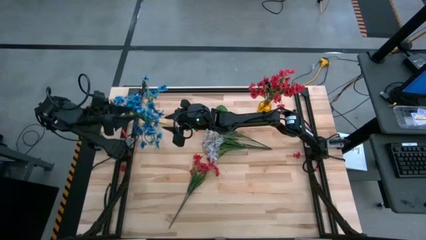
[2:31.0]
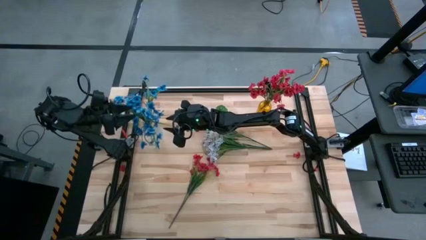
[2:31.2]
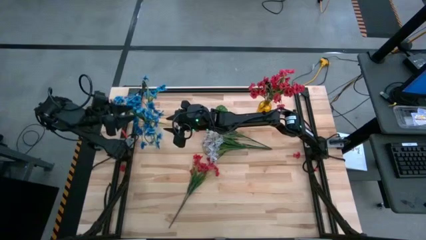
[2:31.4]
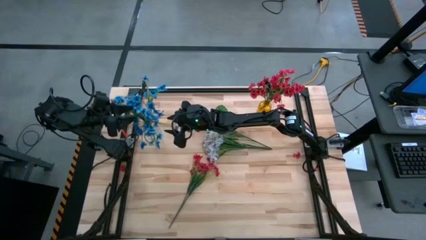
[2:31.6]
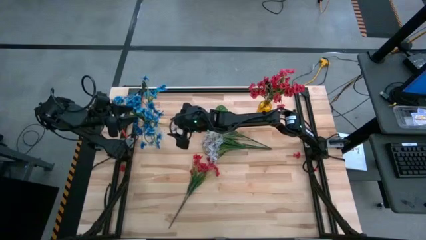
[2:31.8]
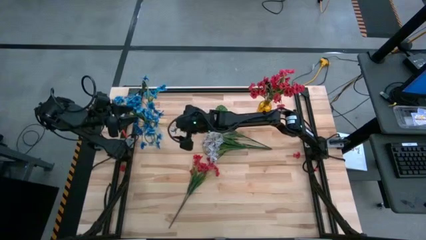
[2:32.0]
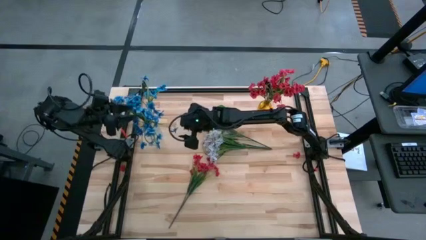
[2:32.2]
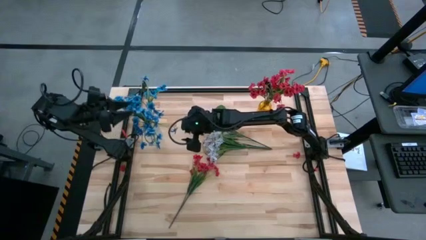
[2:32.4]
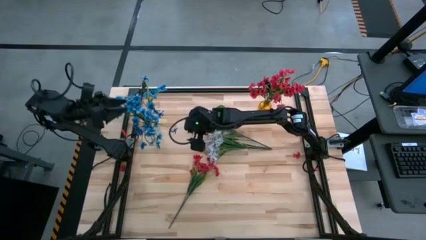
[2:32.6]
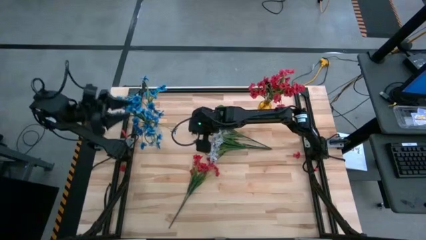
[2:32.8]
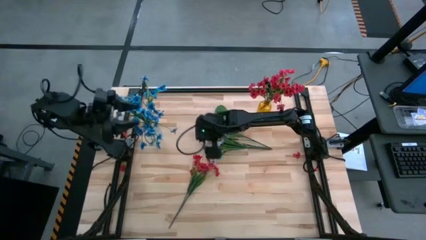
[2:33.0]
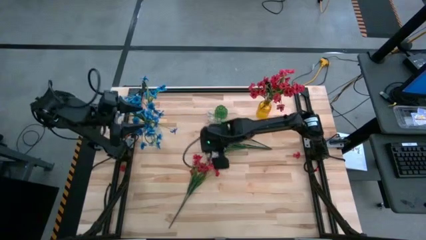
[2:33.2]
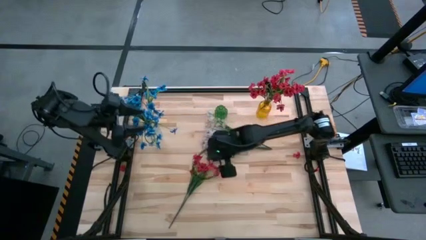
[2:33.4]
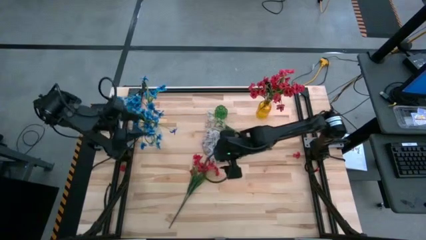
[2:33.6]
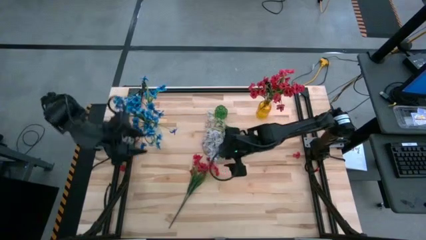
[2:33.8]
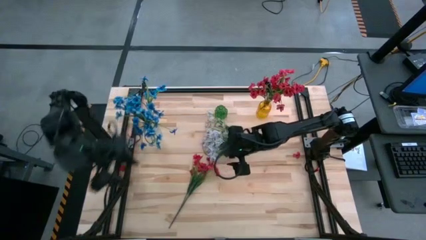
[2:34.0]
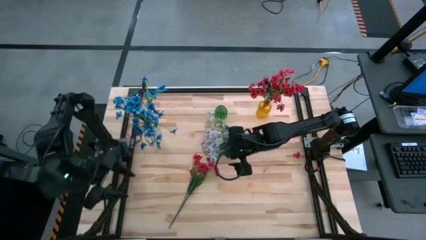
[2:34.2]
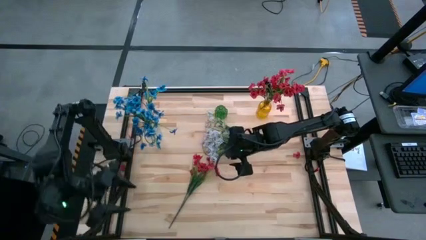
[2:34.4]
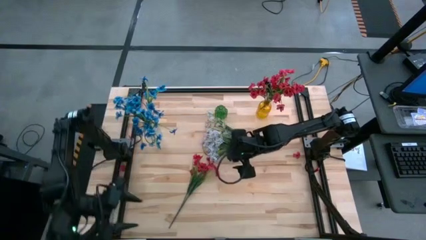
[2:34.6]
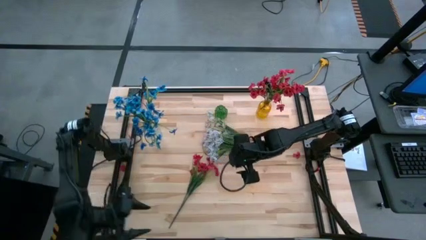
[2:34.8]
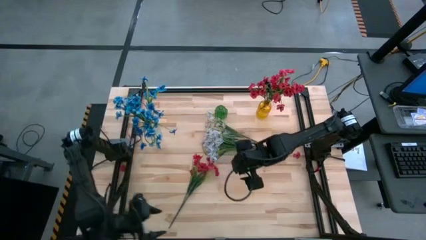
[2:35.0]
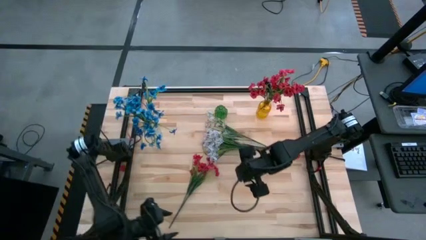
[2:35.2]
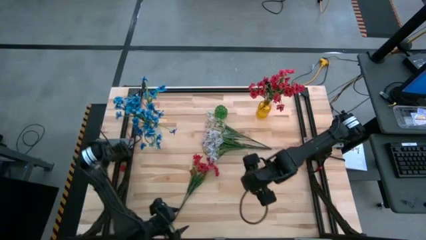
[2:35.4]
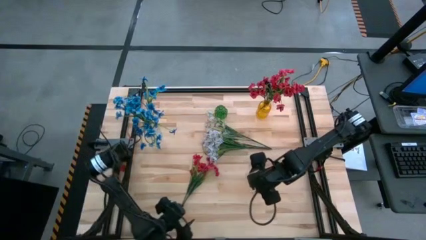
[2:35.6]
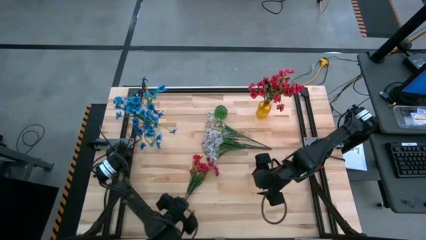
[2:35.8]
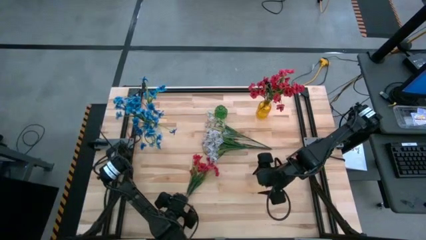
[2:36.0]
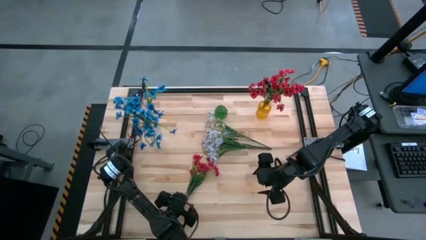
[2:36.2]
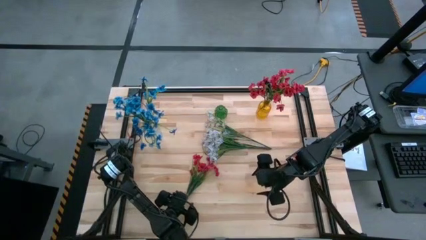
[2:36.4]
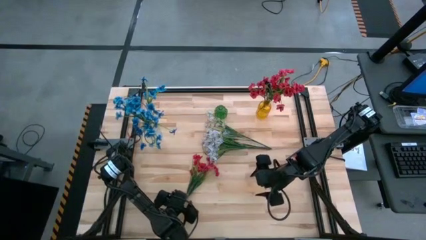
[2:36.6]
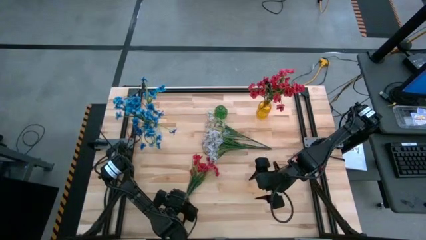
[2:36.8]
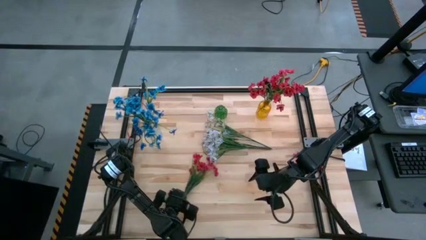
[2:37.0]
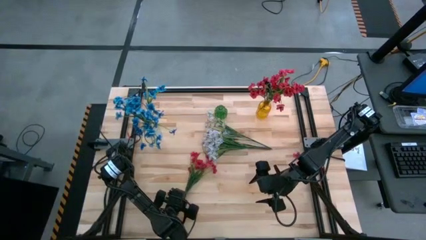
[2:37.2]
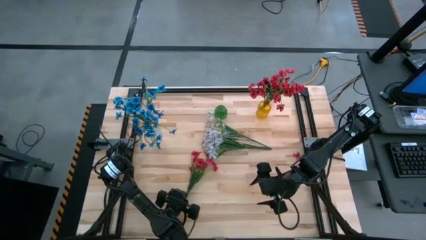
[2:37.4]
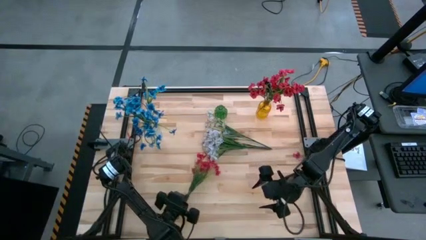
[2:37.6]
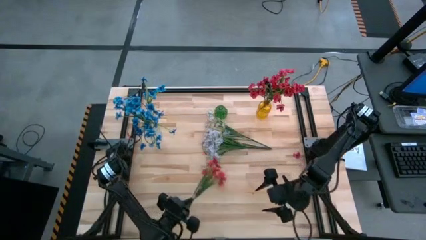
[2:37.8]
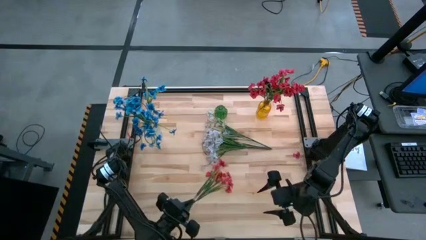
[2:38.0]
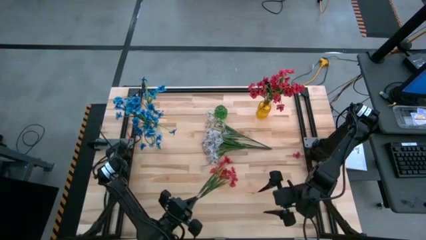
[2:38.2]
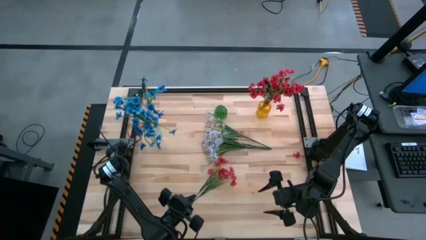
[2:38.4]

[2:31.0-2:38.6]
Task: Sort flowers into vase by color
Put the red flowers into the yellow vase

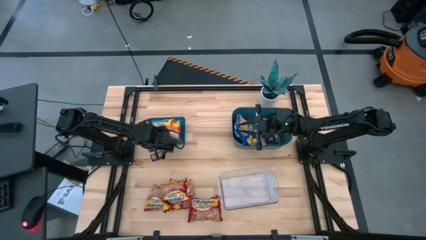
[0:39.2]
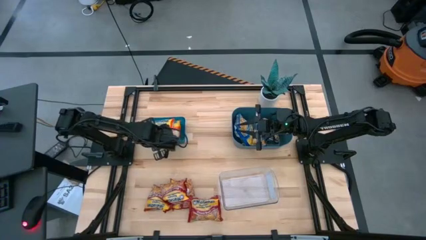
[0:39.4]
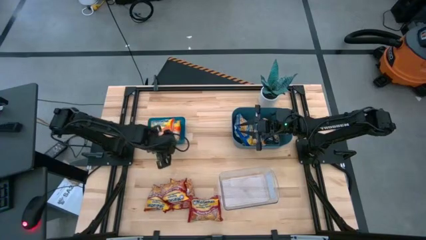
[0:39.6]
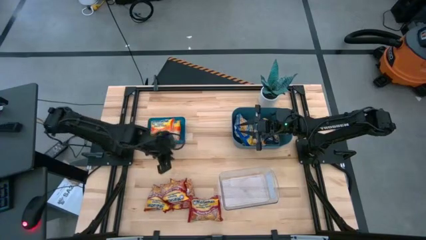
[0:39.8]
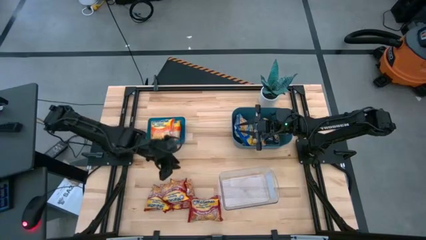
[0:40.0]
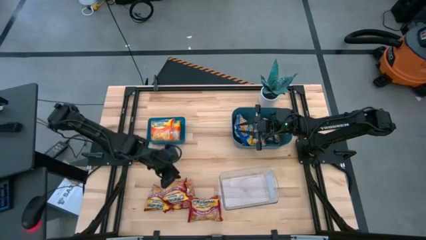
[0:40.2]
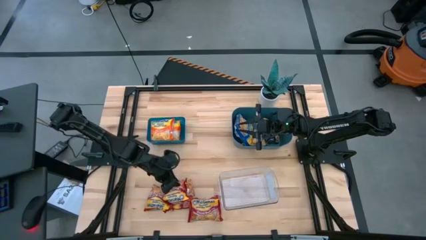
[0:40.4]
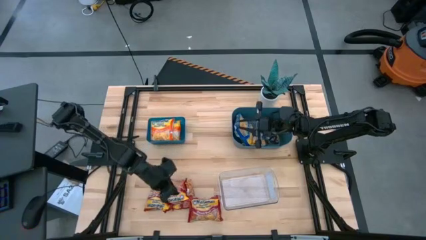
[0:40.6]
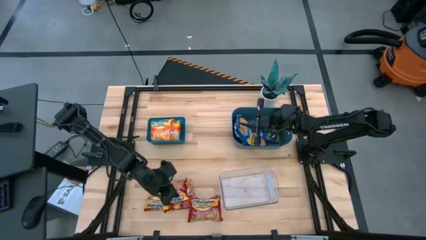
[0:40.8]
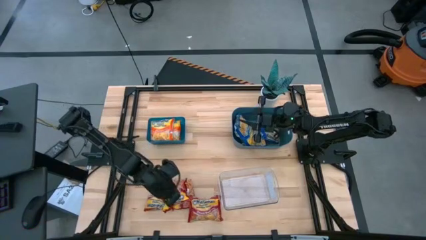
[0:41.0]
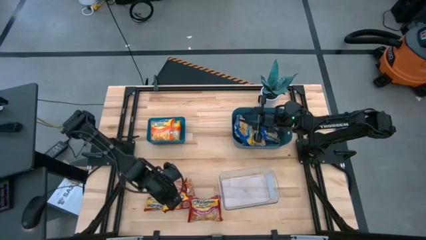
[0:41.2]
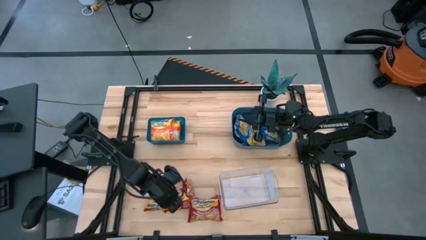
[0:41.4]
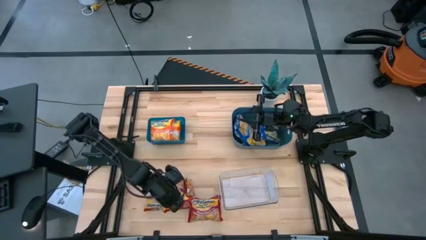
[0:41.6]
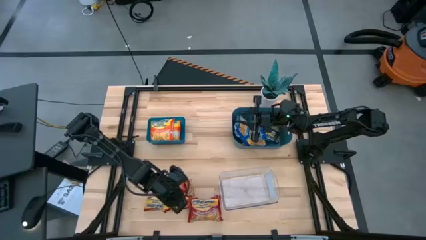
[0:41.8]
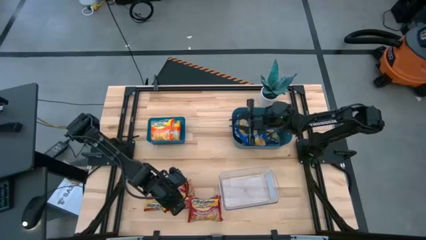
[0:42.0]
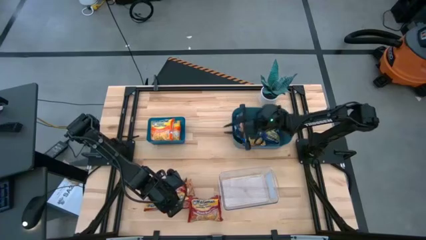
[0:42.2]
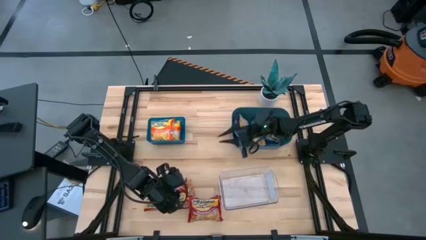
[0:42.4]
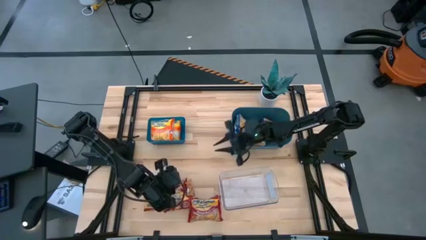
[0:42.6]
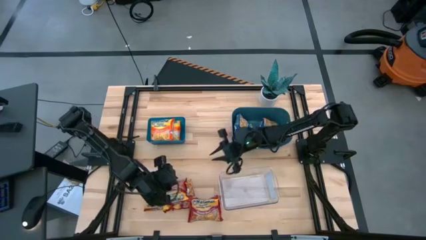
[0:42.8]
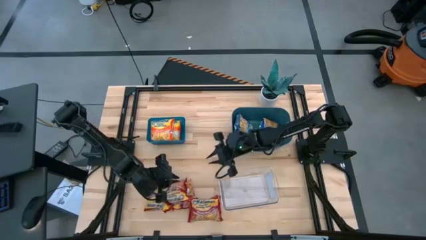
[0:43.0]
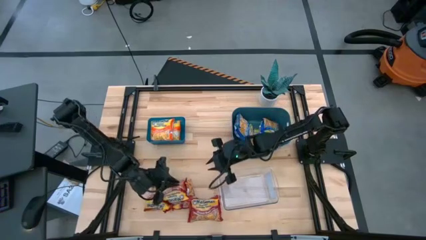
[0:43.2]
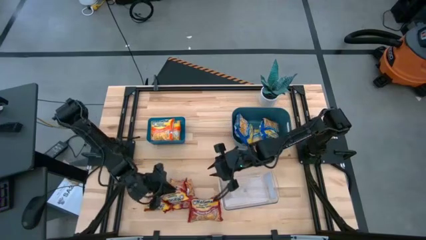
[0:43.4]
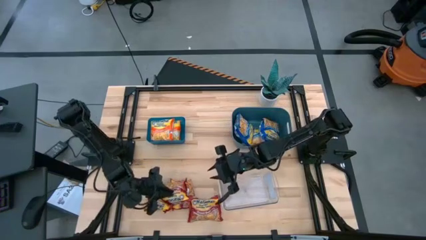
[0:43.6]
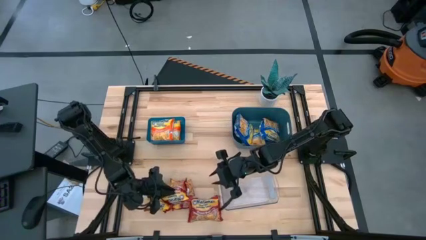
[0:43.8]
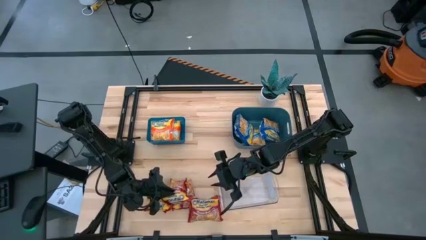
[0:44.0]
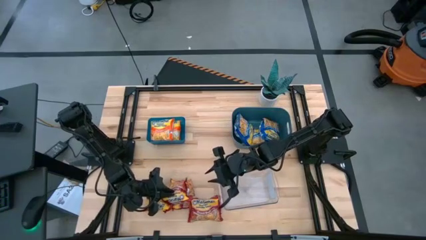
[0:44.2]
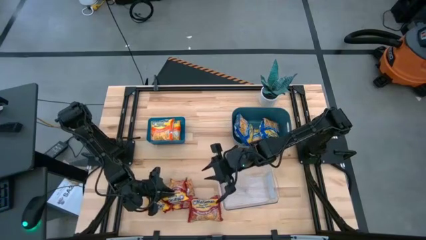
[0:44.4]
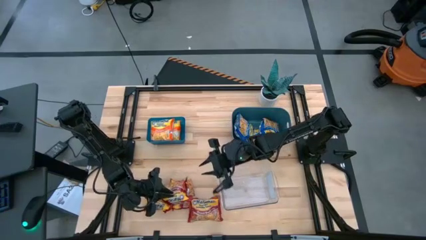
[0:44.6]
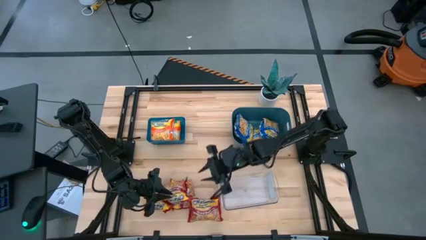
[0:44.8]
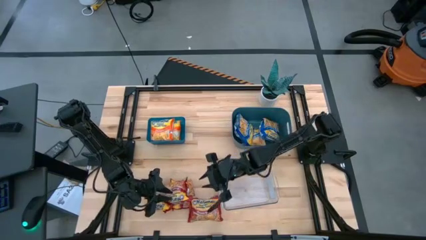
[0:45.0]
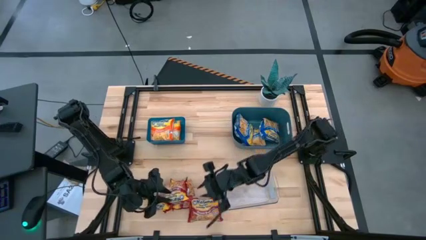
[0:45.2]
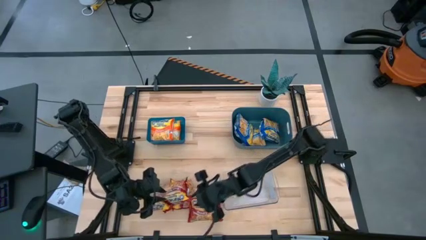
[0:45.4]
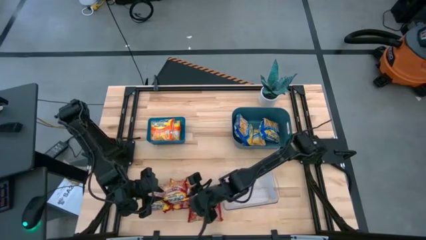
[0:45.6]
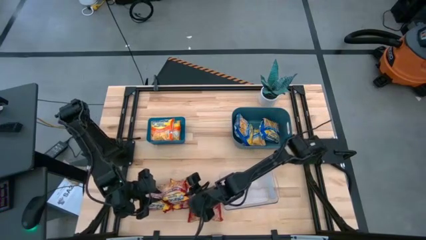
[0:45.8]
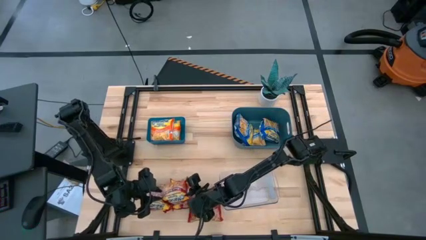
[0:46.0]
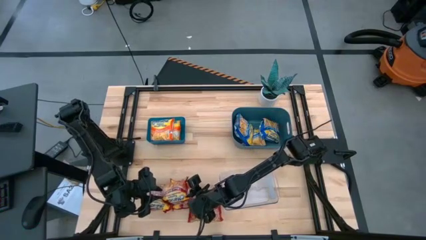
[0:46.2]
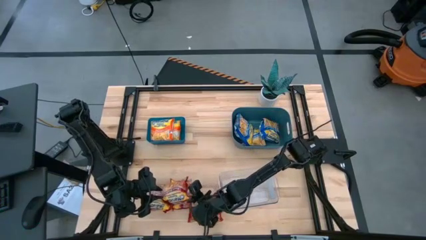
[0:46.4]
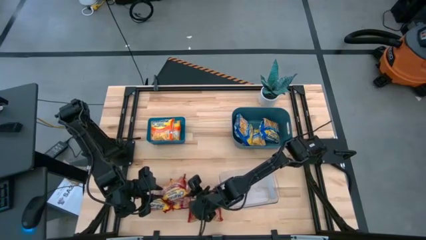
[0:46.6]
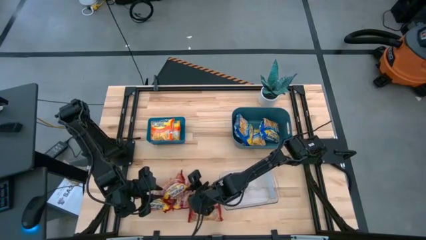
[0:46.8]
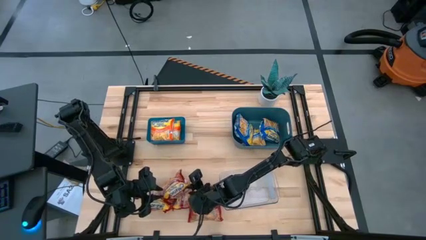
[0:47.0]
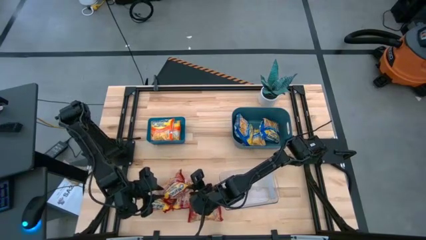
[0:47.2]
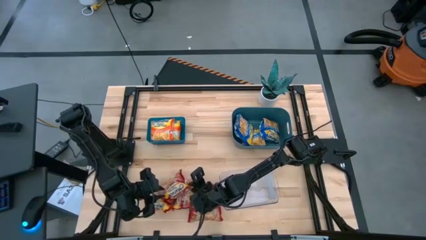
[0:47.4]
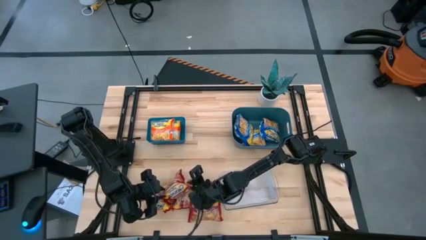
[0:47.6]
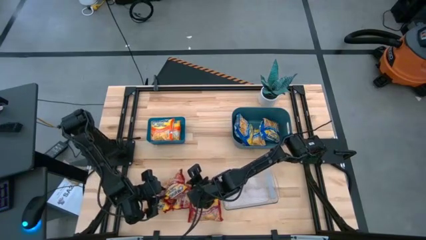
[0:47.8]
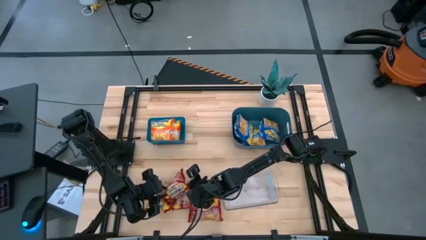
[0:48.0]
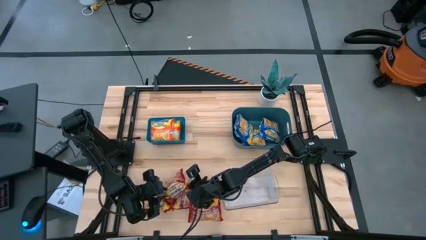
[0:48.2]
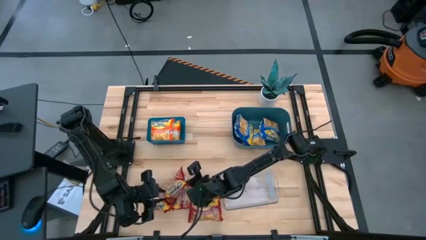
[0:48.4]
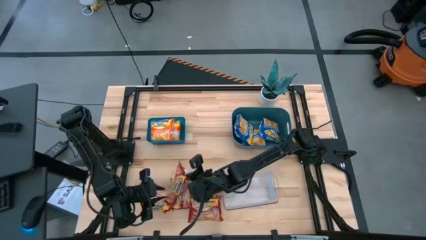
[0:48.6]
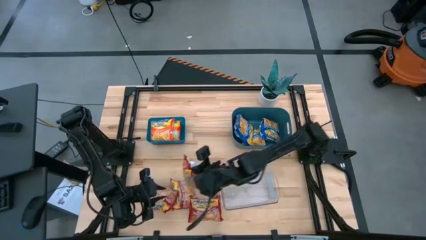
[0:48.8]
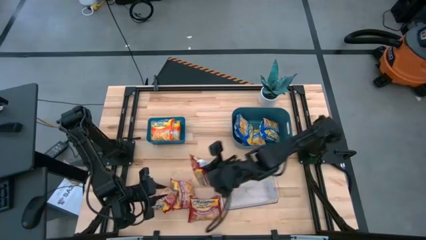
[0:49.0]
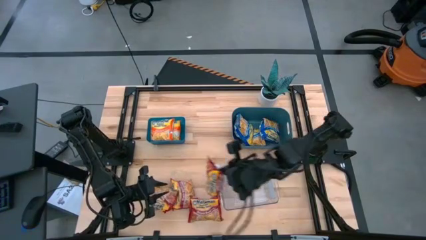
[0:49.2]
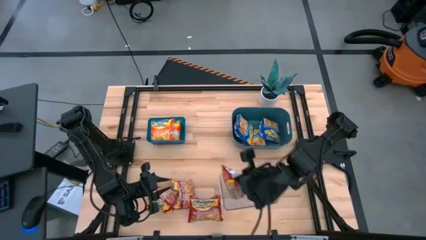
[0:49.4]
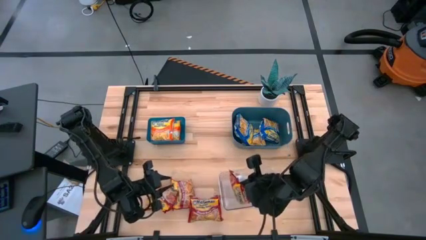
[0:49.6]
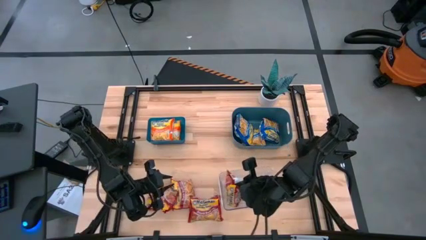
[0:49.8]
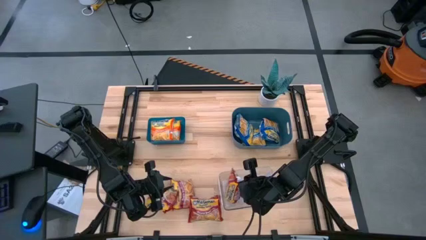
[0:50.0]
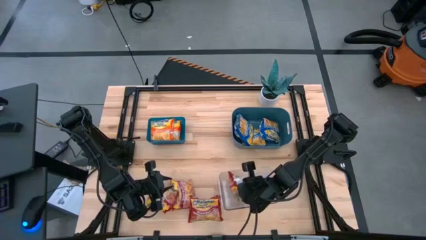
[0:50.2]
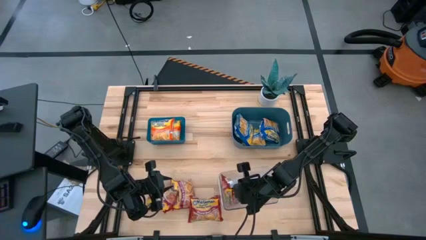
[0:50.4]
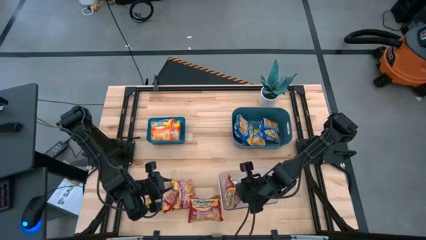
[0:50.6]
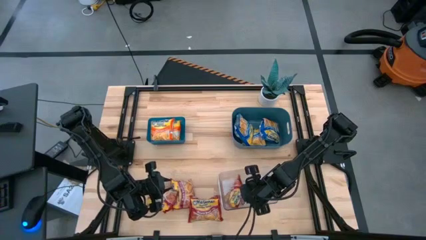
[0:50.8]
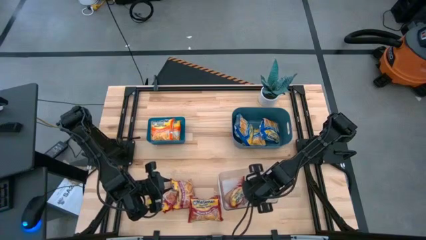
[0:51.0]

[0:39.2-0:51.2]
Task: Sort Maruchan noodles
Put the red noodle pack into the transparent bin
